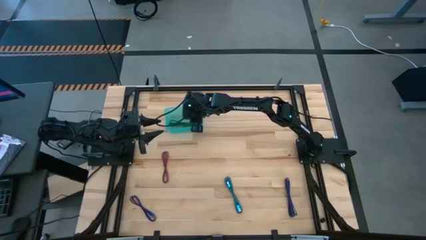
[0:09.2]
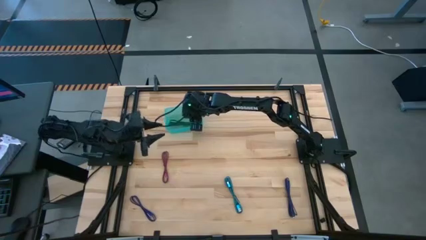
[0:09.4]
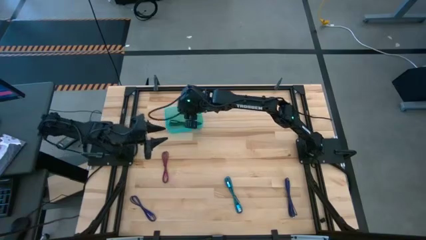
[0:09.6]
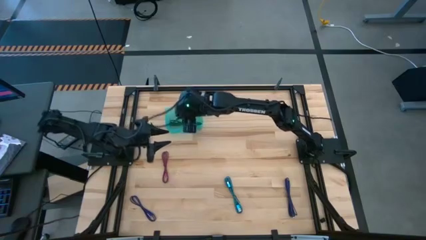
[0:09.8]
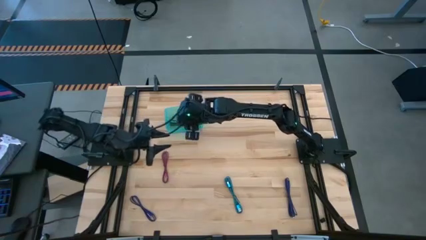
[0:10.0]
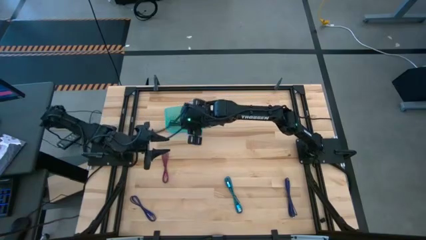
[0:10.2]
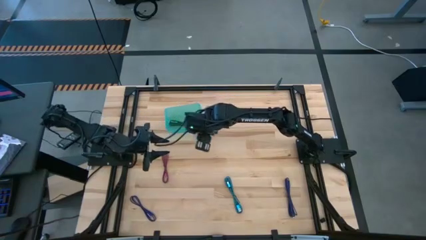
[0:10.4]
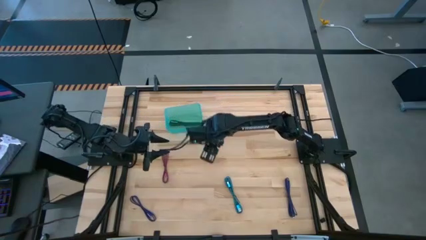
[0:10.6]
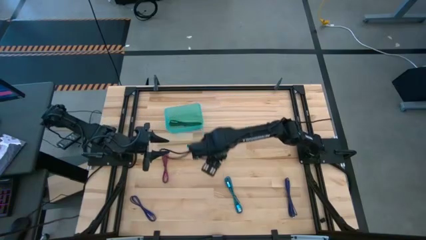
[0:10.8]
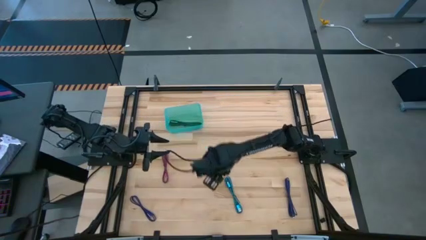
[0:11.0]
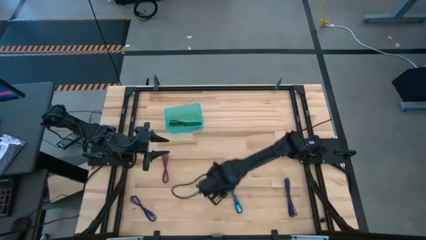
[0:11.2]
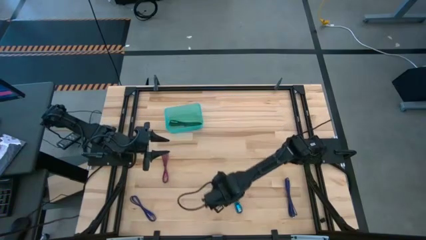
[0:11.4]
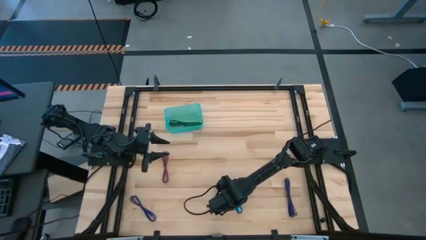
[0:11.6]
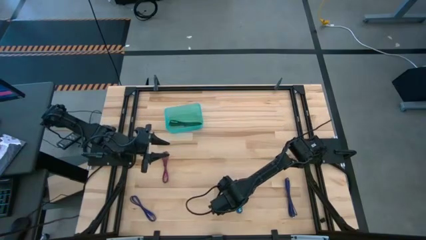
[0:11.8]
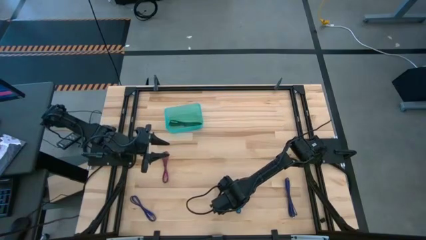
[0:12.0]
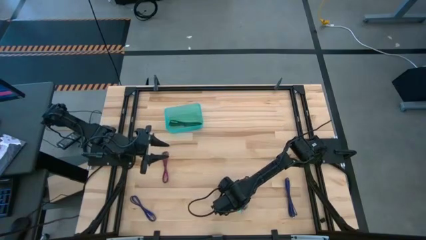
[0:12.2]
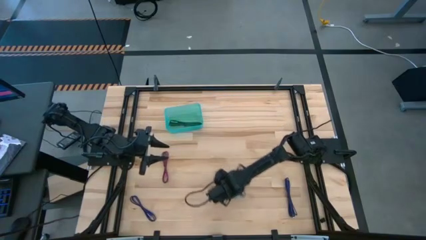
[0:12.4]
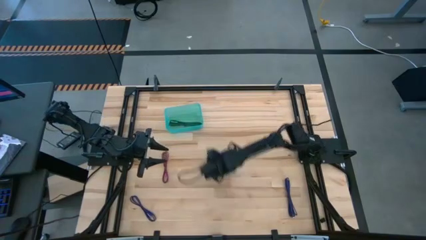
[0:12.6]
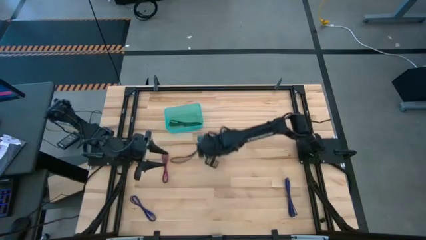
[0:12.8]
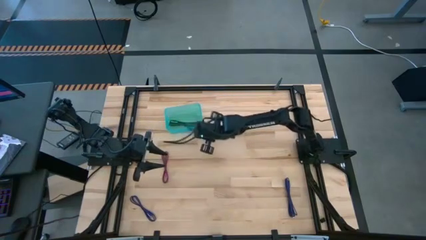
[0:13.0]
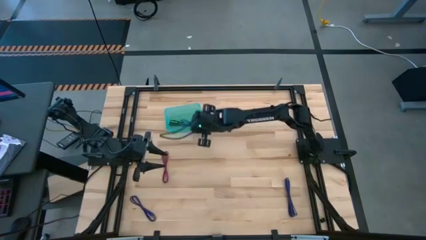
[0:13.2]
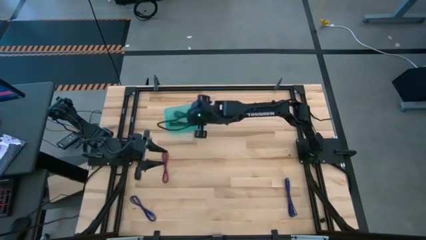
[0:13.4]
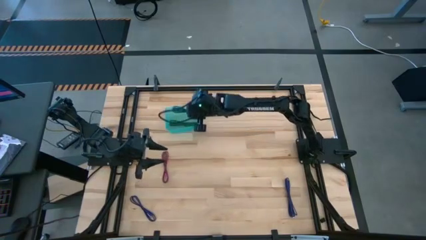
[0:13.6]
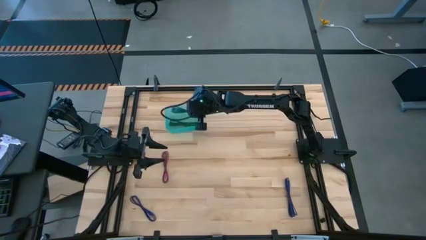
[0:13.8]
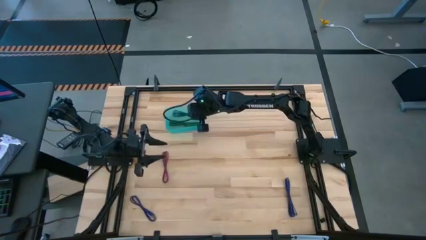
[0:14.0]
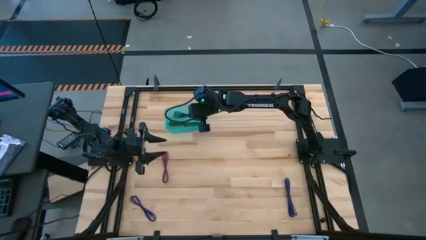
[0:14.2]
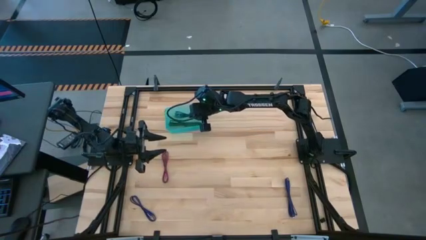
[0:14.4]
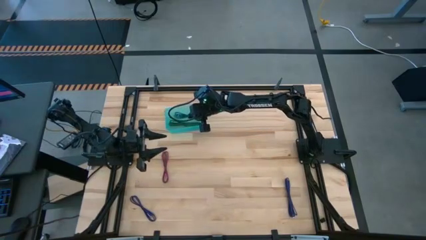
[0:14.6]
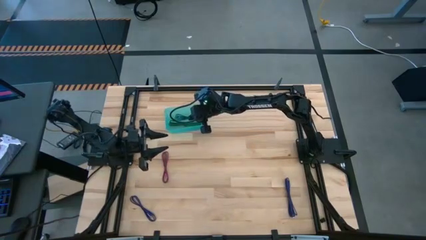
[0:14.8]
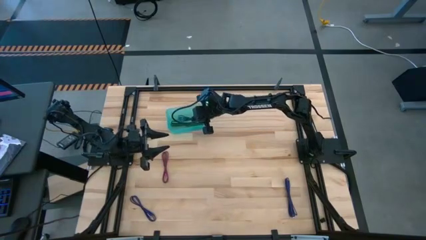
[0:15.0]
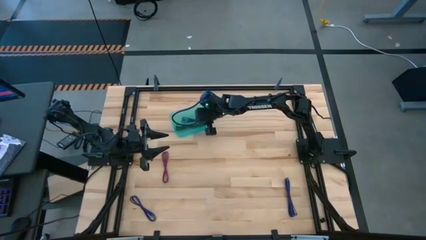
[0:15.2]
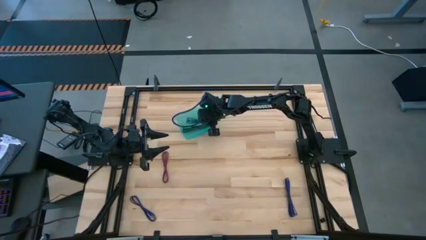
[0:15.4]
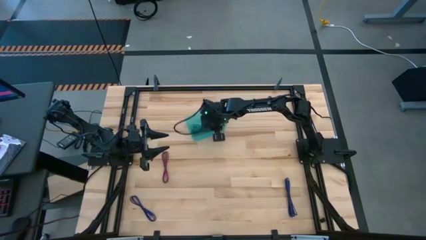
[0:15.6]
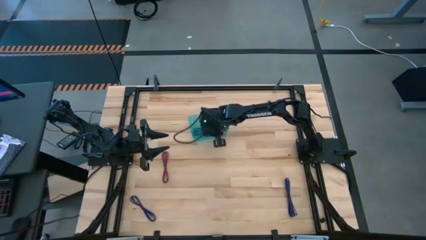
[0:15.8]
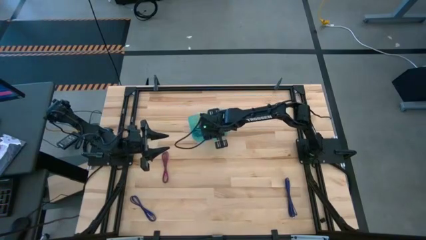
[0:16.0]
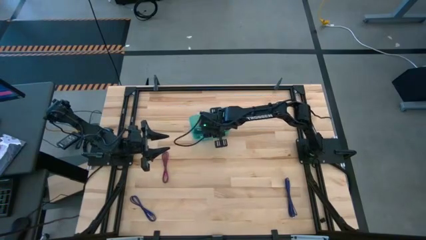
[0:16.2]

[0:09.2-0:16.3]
Task: Pick and place USB-C Cables
Put the blue charger cable into the green bin

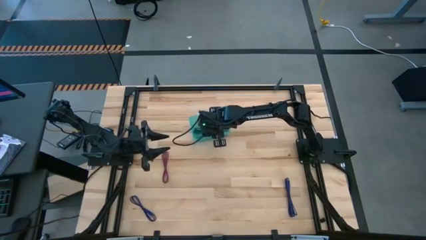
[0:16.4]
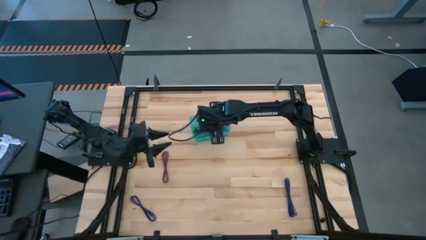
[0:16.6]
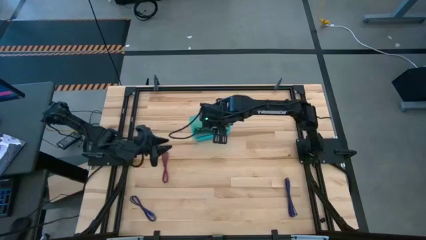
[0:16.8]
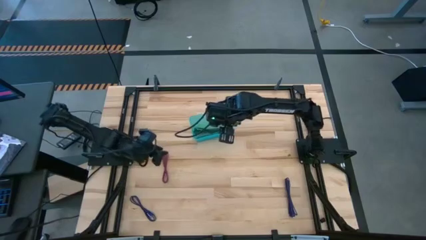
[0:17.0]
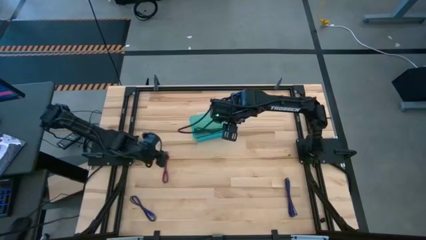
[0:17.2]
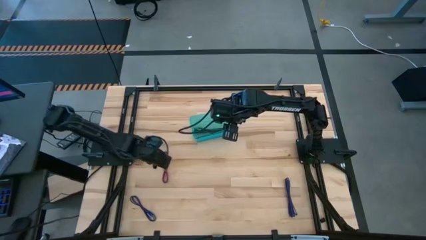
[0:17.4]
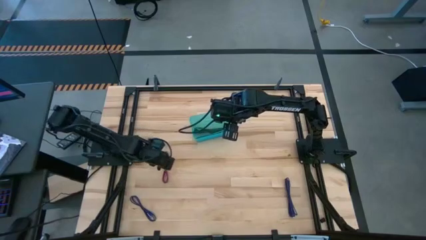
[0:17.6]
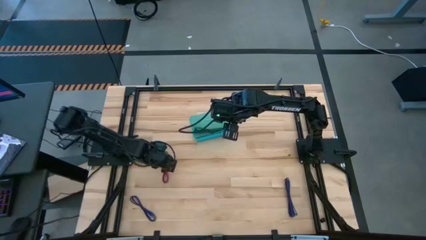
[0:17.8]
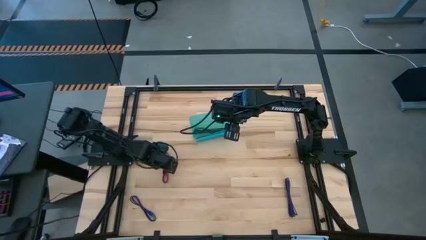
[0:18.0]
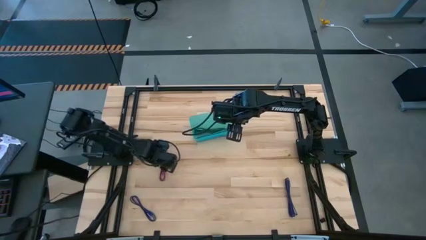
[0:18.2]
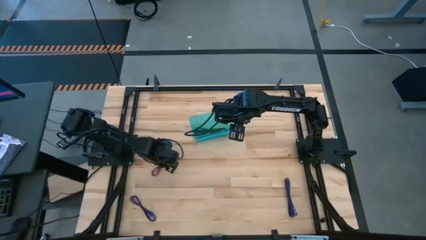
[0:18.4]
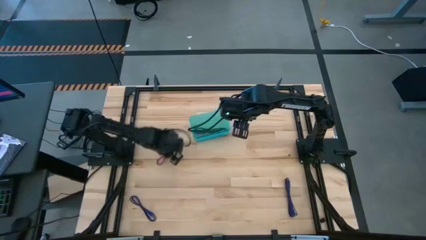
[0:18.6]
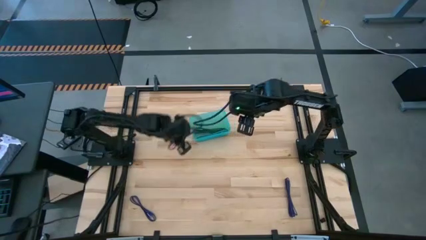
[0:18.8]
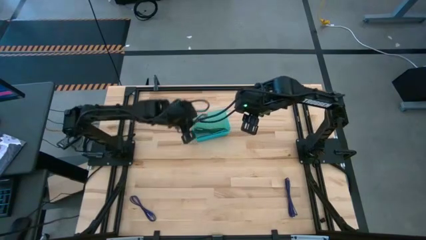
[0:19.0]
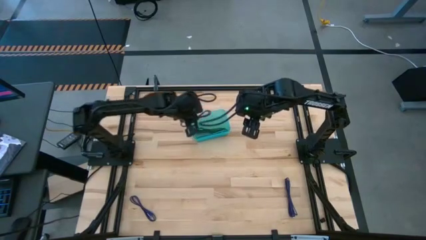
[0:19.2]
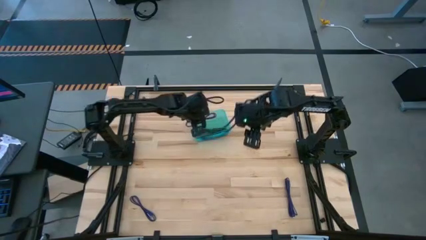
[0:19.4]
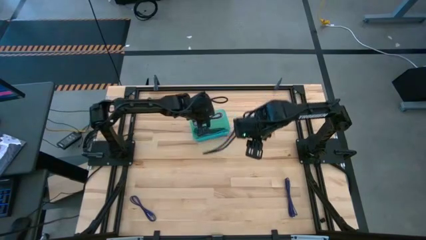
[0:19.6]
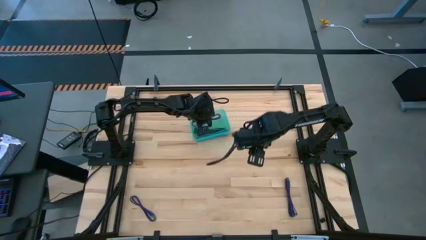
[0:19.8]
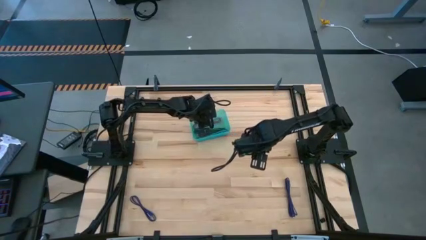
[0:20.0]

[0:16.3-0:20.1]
Put the pink charger cable into the green bin

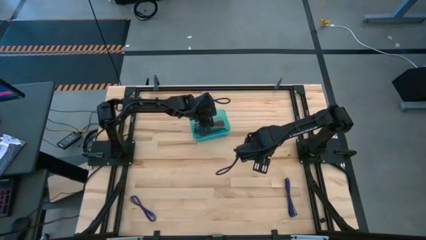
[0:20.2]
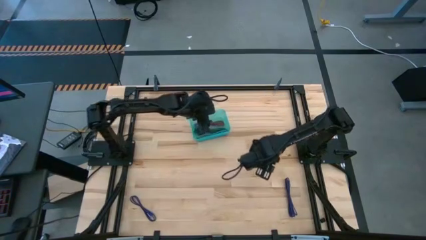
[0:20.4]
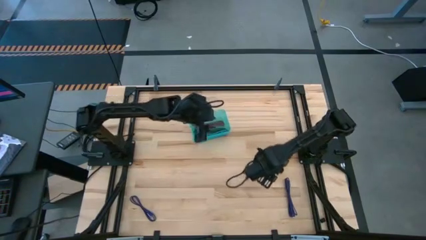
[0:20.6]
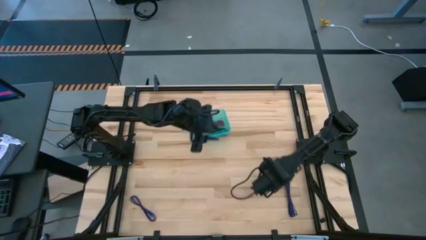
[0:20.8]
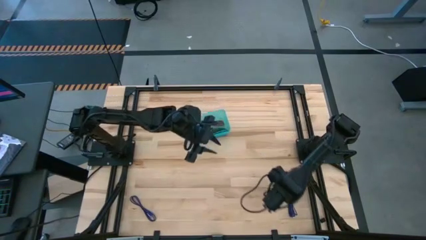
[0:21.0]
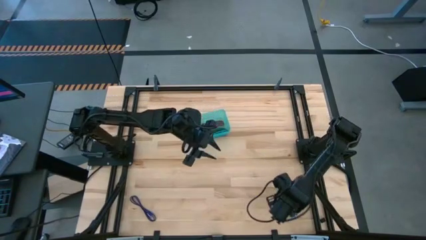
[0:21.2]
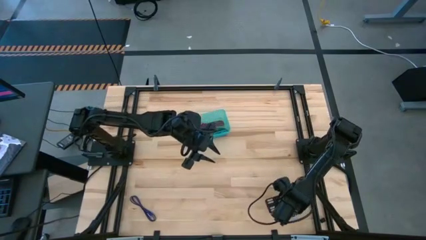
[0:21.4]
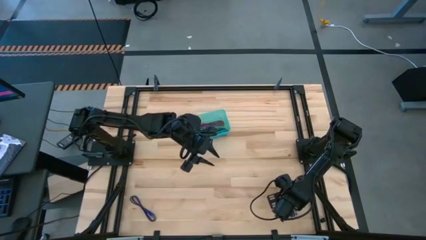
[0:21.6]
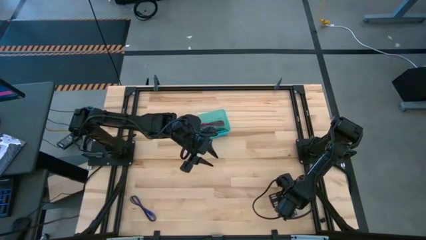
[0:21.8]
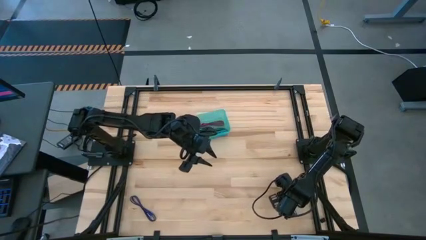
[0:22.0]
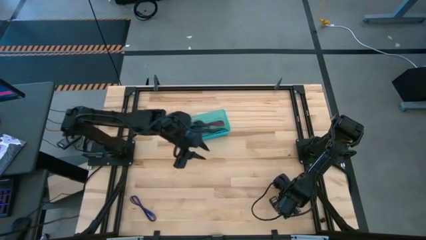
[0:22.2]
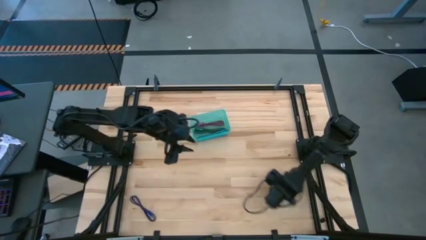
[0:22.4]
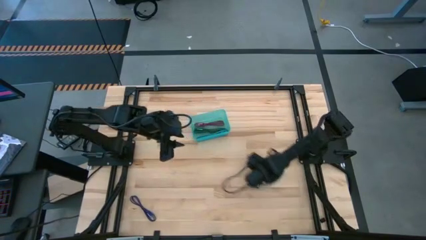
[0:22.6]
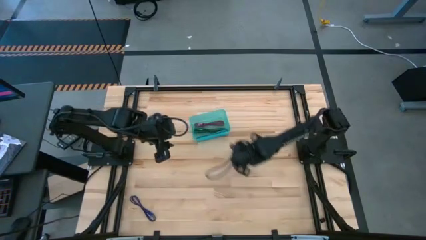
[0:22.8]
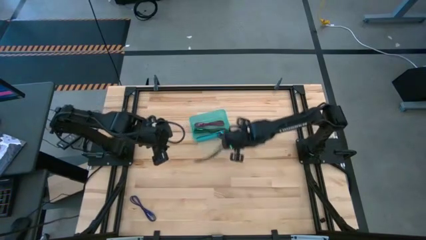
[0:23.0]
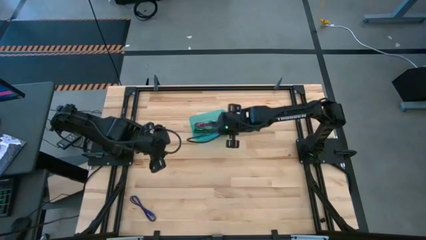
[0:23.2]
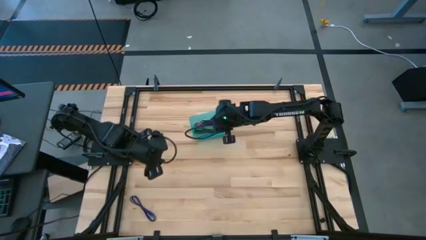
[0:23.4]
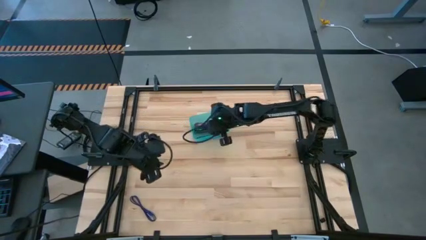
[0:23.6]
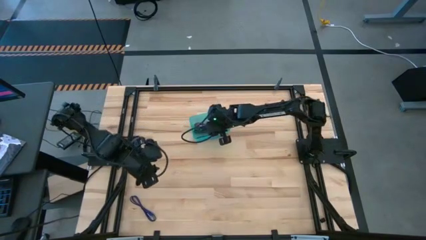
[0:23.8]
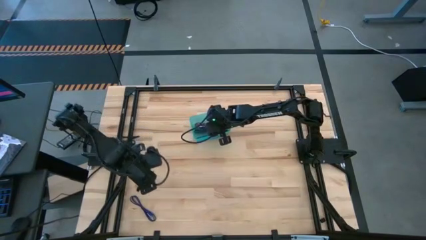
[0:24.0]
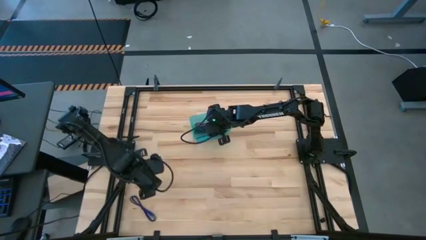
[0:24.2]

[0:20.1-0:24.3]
Put the right purple charger cable into the green bin

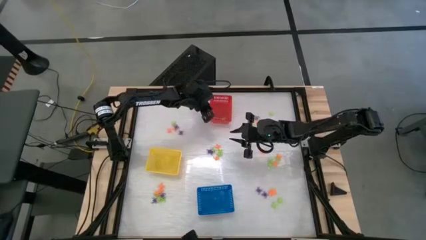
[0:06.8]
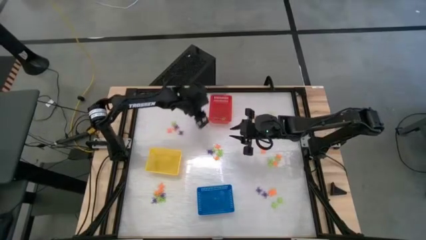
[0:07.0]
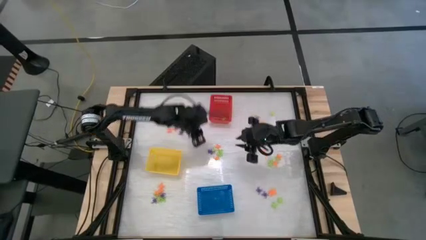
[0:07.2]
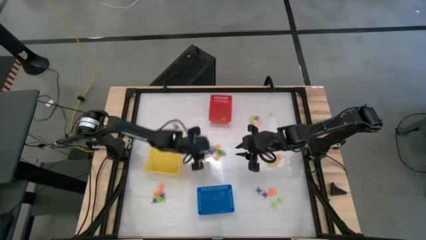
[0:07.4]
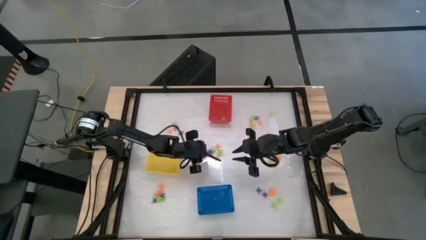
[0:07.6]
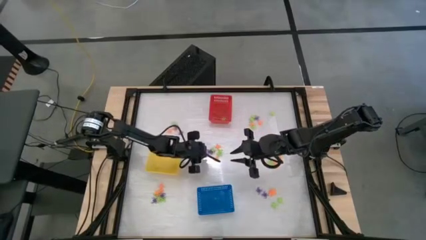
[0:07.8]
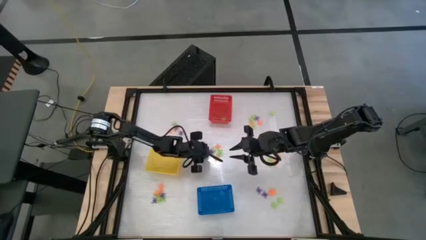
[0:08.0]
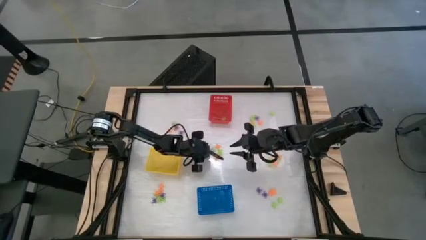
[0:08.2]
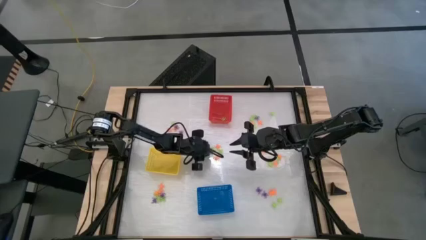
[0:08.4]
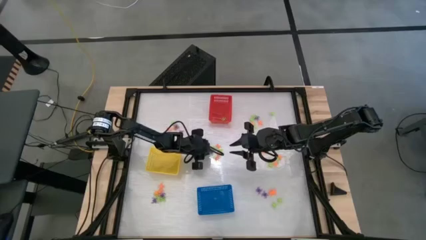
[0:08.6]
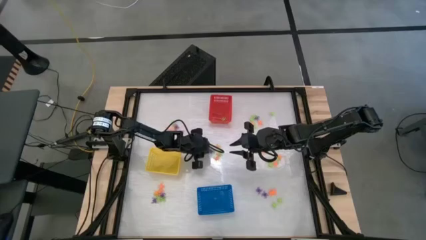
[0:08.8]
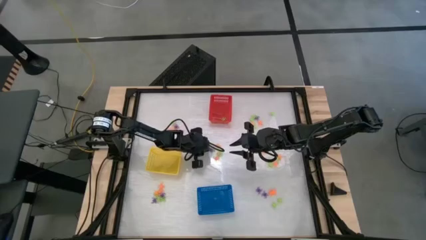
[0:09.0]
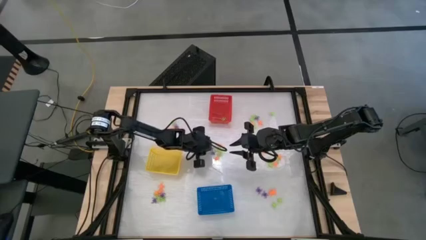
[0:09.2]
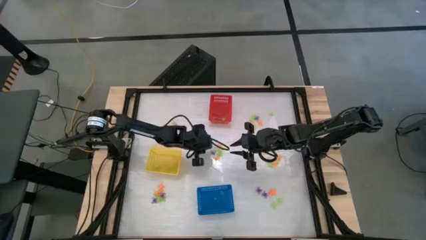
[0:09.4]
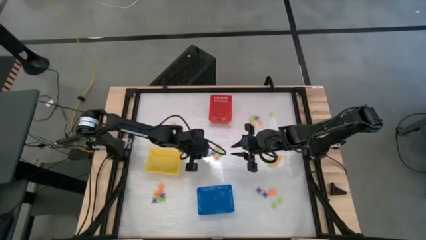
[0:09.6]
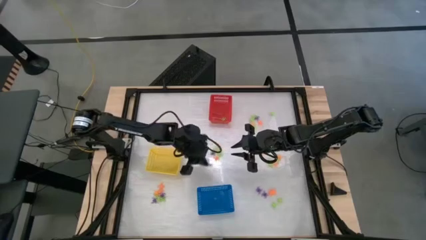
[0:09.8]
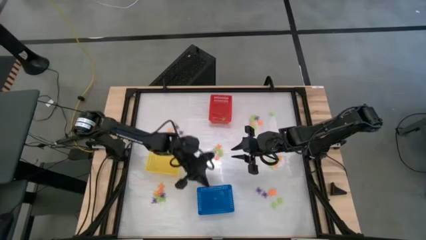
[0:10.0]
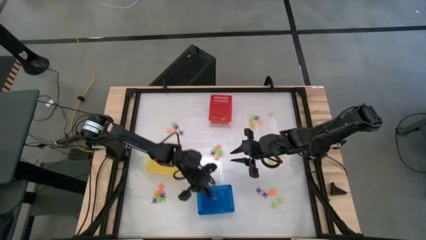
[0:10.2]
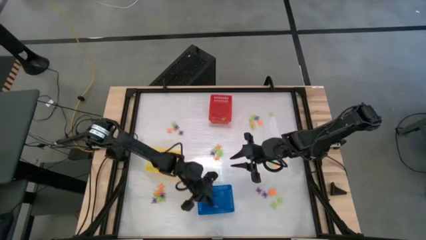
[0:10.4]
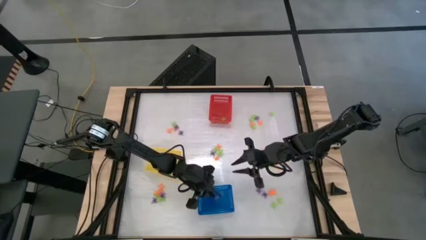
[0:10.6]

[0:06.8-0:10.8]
Task: Sort Halloween decoration
Put the purple spider toy into the blue basket
